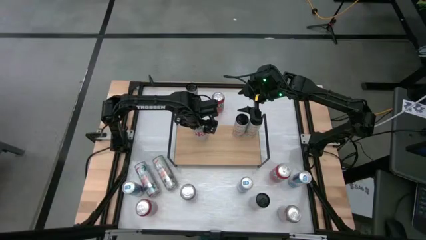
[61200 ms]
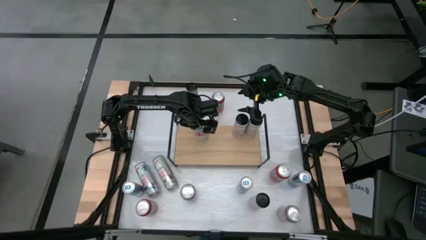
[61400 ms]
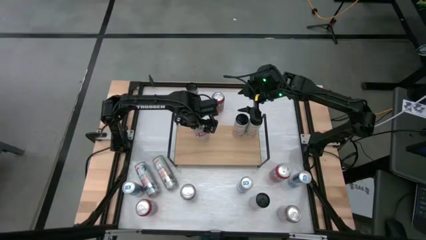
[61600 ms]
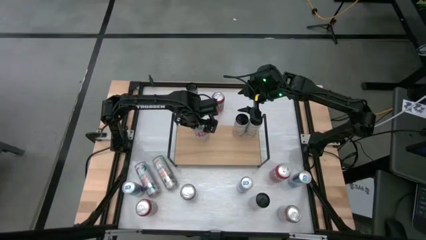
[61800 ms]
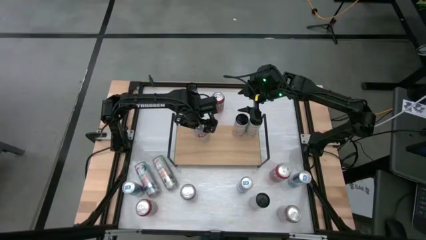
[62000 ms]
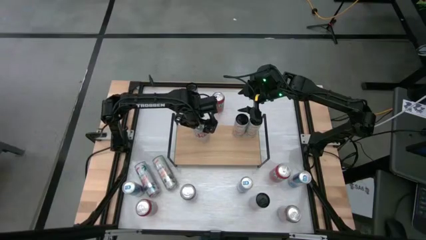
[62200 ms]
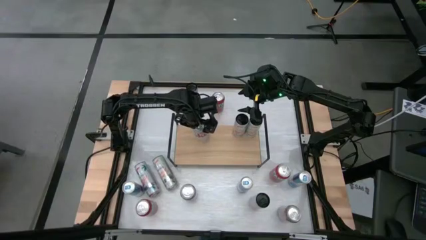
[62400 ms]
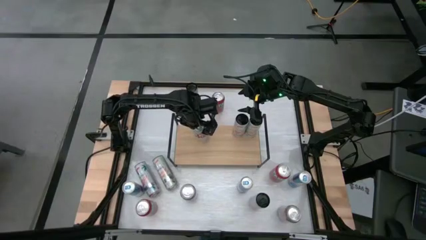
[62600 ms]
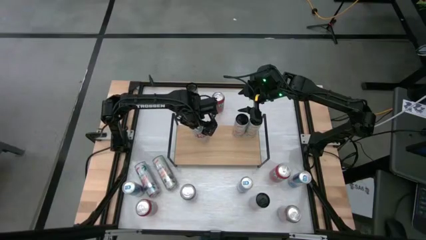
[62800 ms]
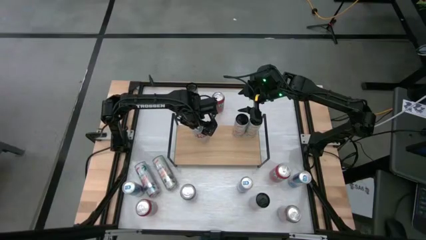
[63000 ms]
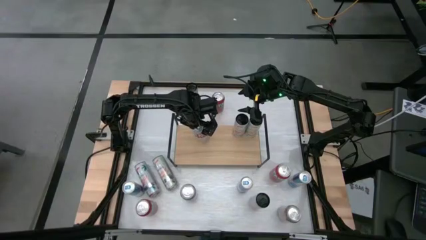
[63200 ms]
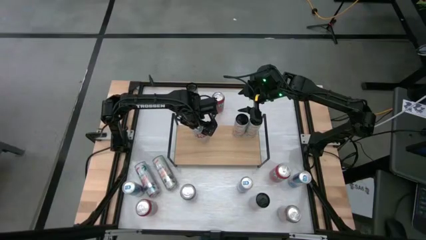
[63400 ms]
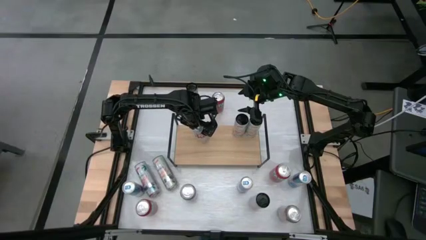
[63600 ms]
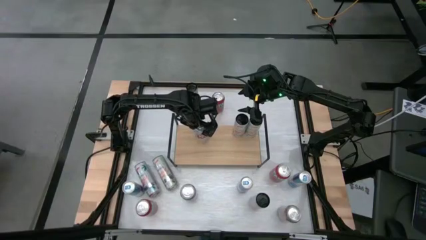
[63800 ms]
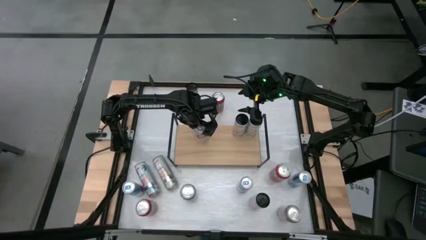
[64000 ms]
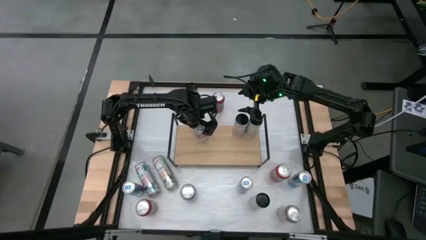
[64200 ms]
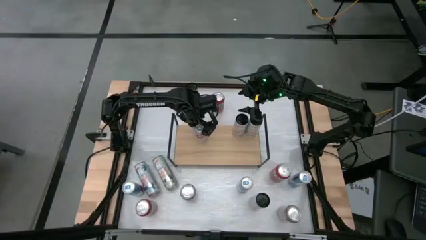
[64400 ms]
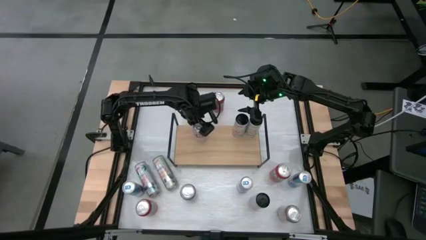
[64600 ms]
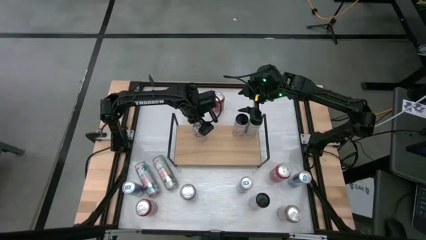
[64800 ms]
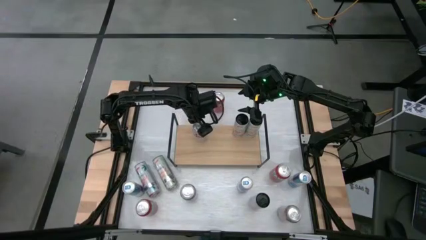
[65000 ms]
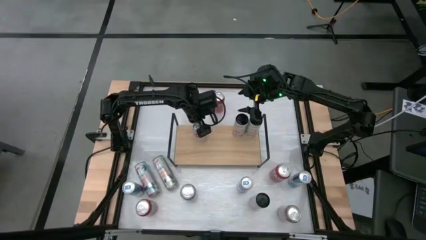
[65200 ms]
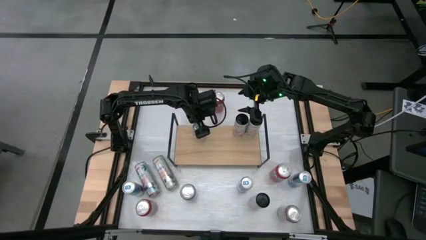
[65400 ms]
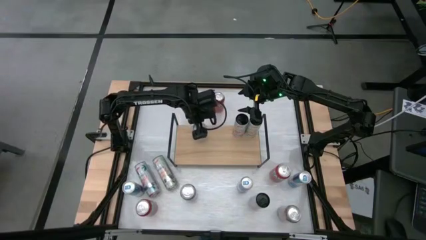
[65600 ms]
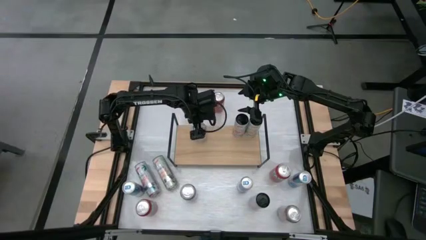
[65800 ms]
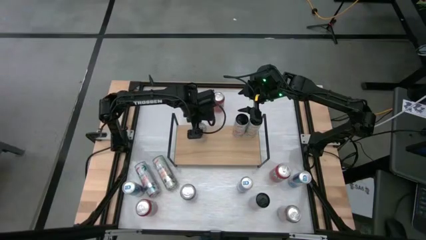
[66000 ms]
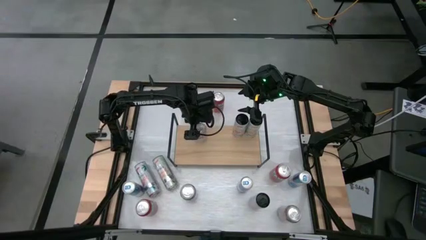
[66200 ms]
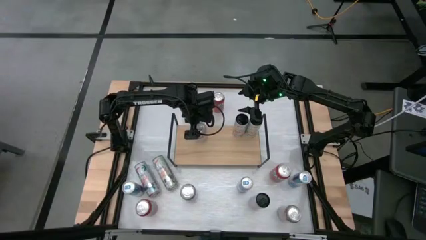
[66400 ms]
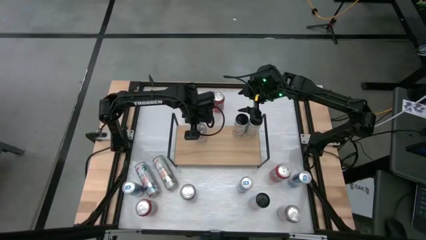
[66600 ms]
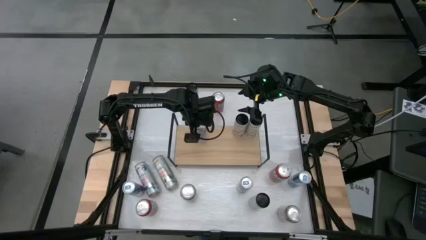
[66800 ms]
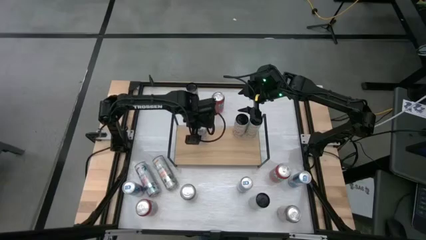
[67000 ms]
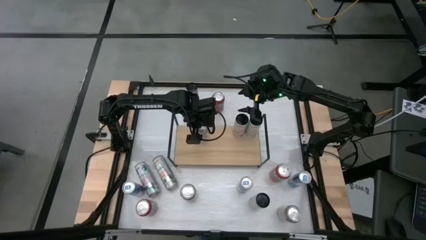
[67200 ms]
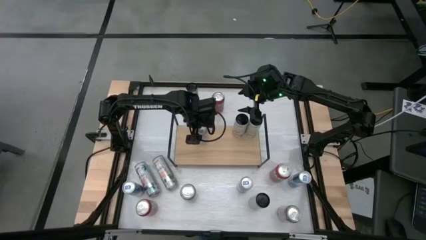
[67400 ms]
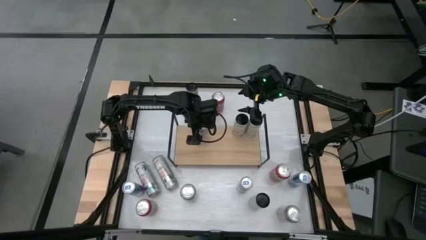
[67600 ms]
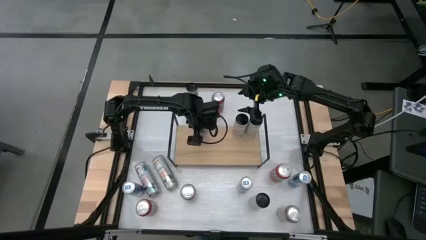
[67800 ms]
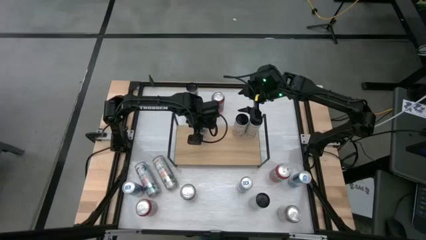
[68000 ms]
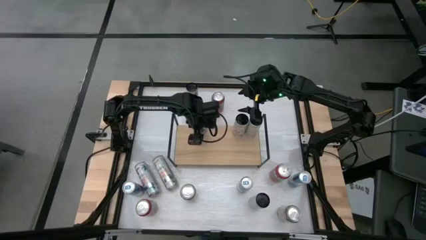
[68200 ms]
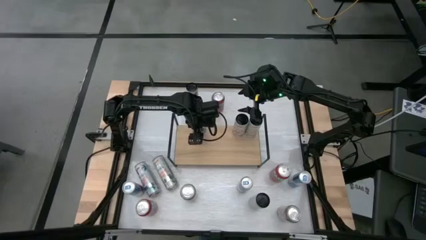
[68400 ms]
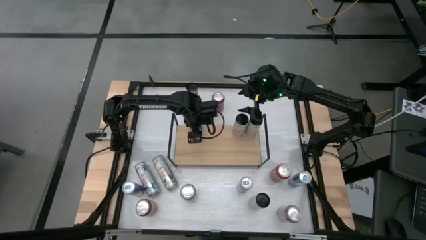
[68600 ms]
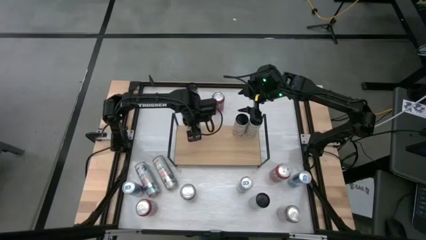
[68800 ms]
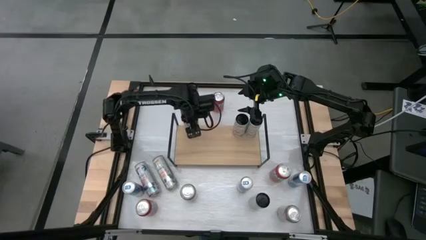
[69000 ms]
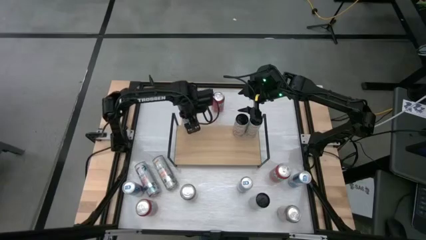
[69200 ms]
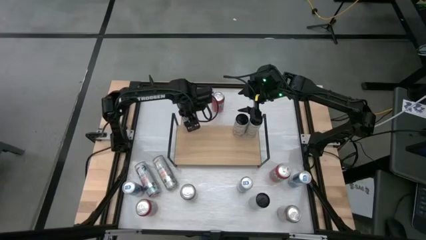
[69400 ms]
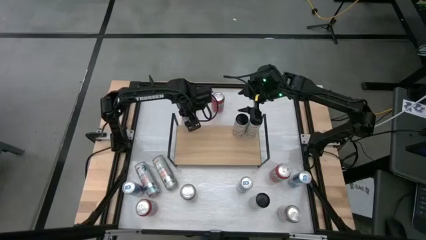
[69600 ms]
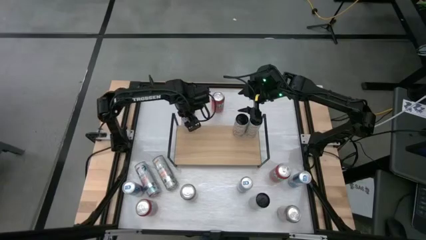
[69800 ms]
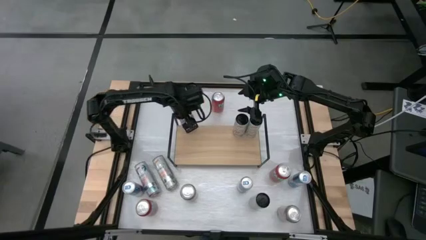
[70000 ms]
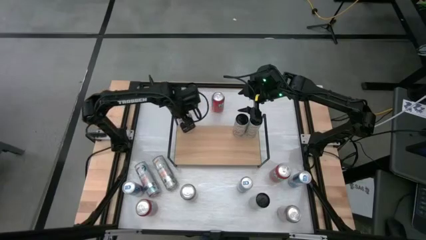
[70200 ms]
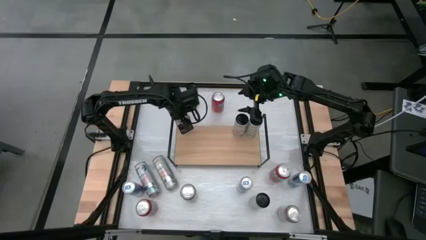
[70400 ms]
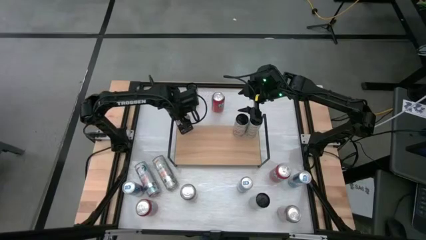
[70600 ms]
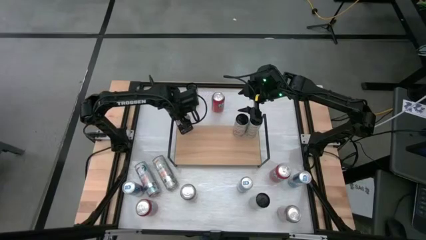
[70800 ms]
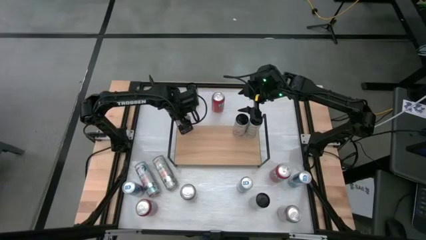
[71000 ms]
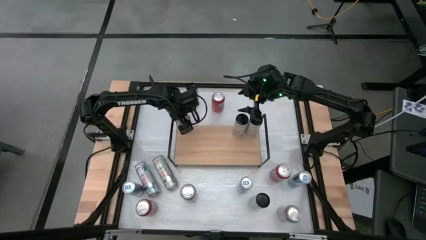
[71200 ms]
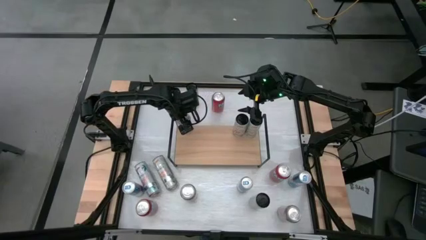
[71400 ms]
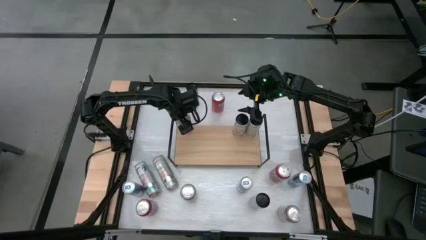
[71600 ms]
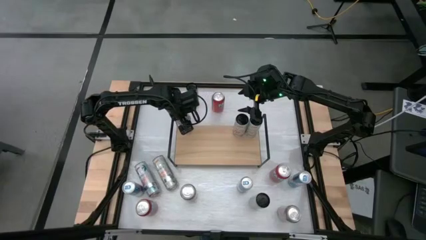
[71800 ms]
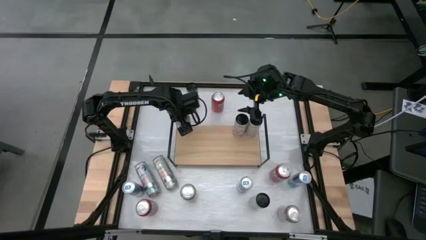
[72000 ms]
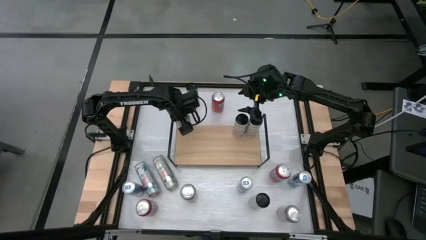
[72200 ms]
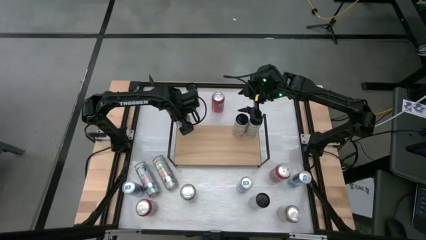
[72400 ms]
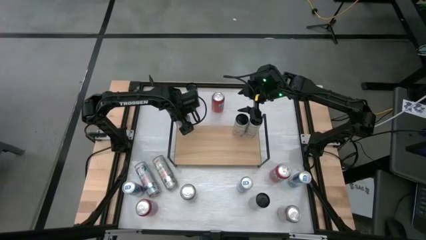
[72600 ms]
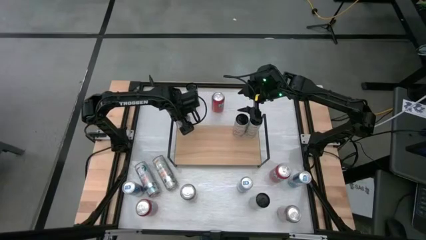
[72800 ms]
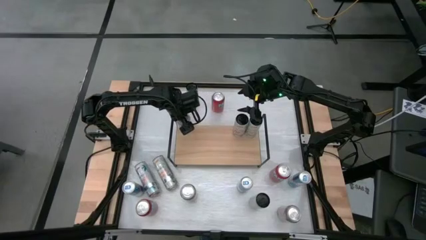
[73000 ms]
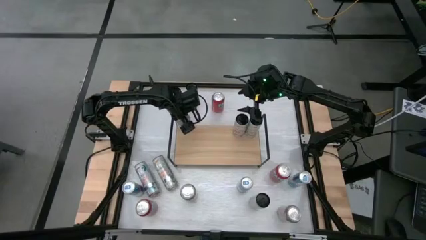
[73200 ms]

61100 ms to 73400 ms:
Task: Place canned beverage on shelf
Put the top left silver-red soda can on the shelf
